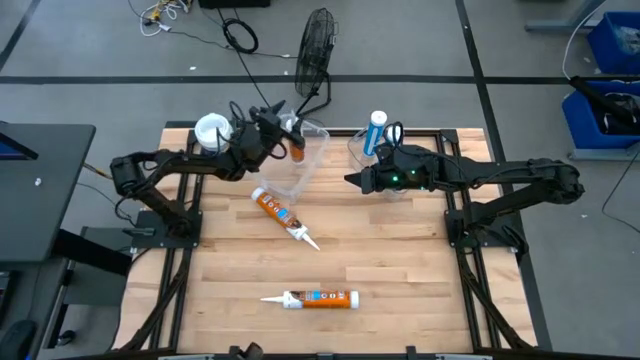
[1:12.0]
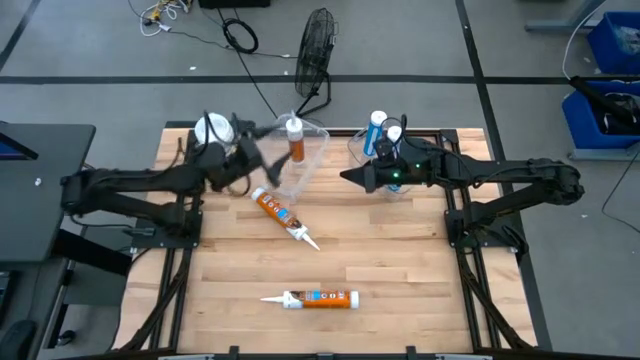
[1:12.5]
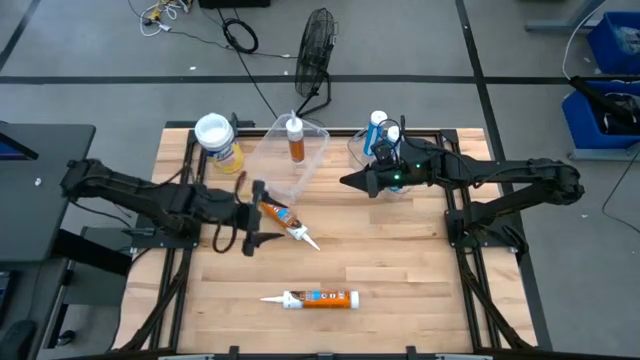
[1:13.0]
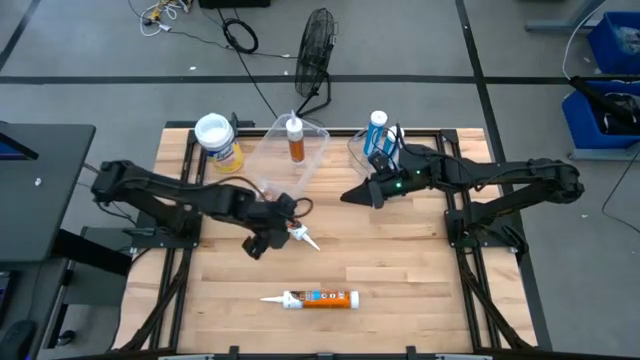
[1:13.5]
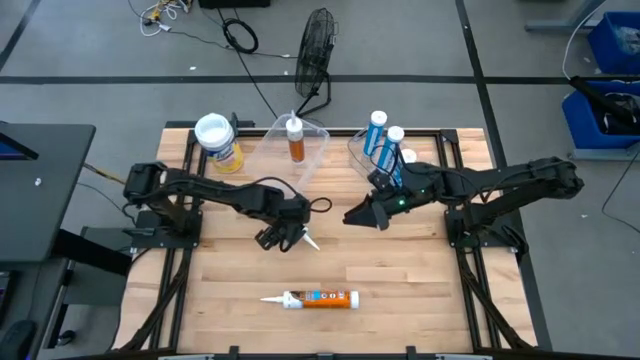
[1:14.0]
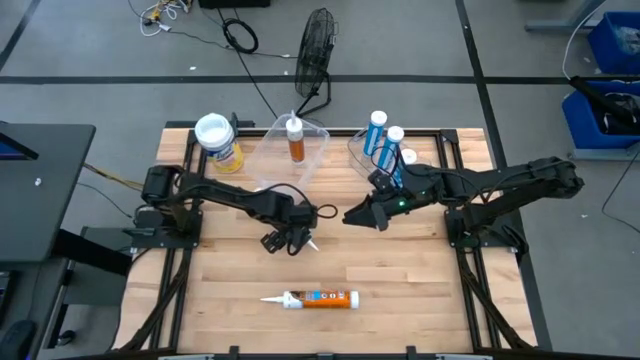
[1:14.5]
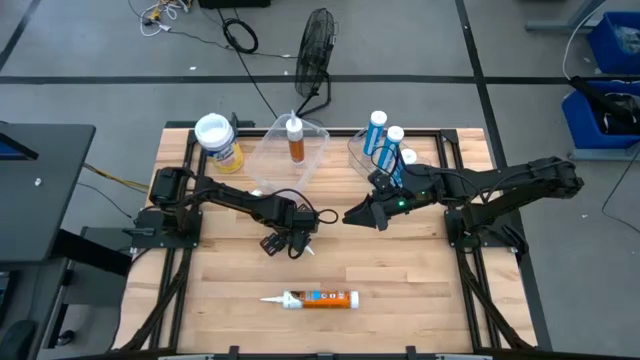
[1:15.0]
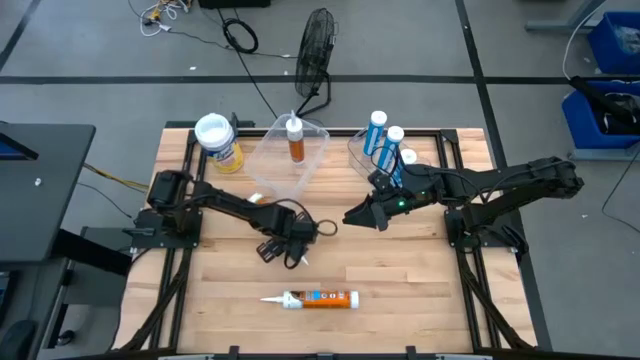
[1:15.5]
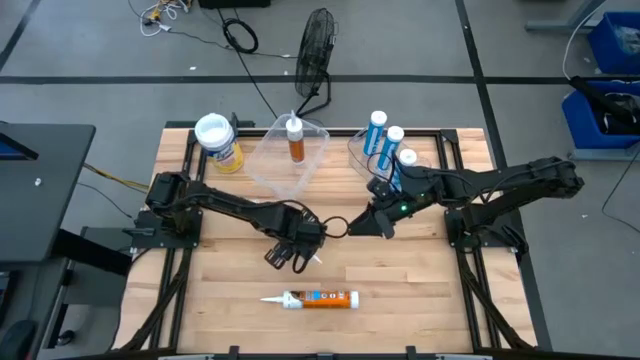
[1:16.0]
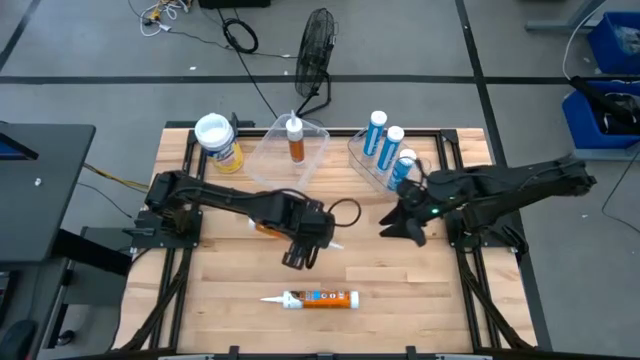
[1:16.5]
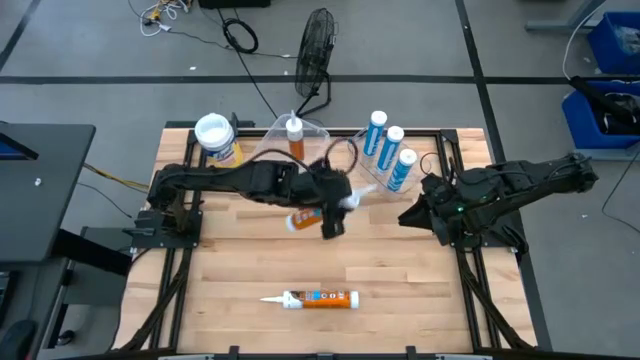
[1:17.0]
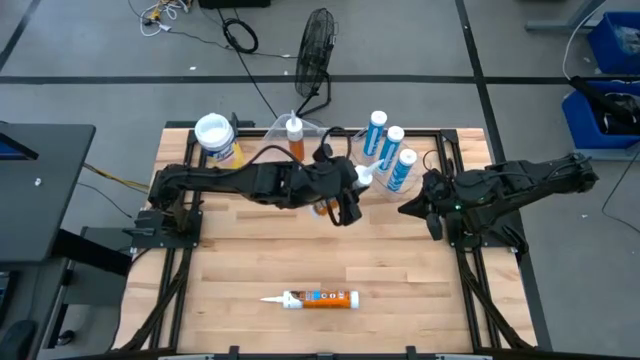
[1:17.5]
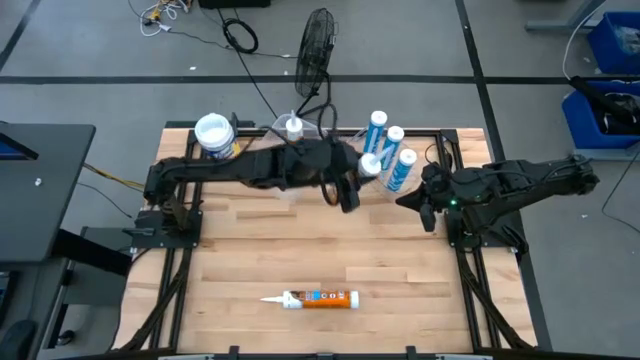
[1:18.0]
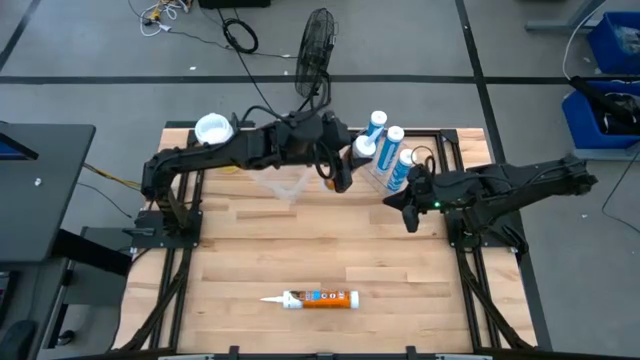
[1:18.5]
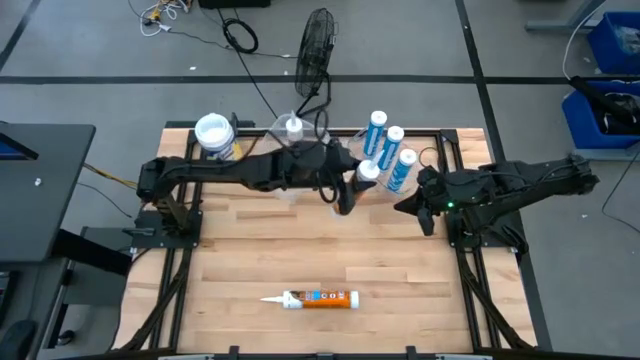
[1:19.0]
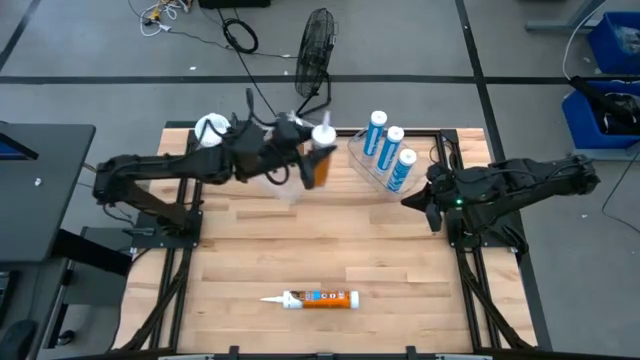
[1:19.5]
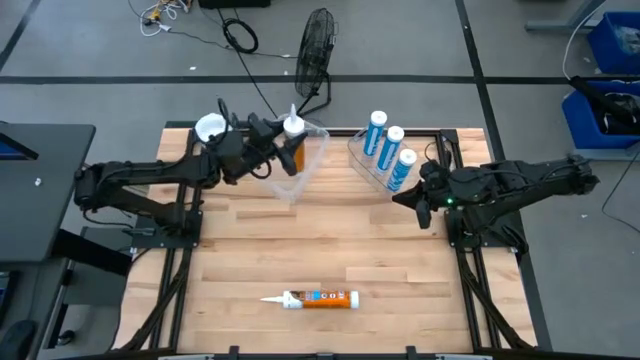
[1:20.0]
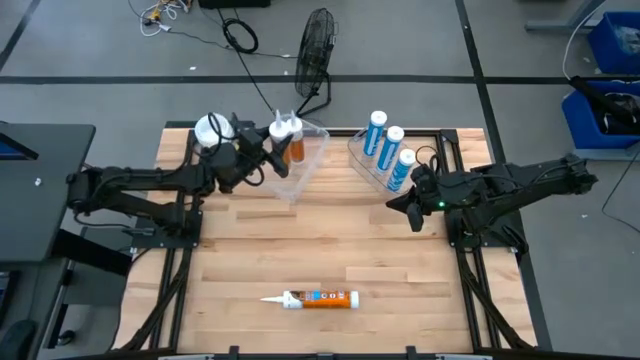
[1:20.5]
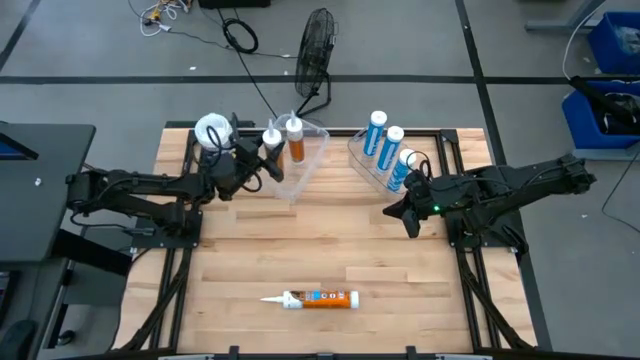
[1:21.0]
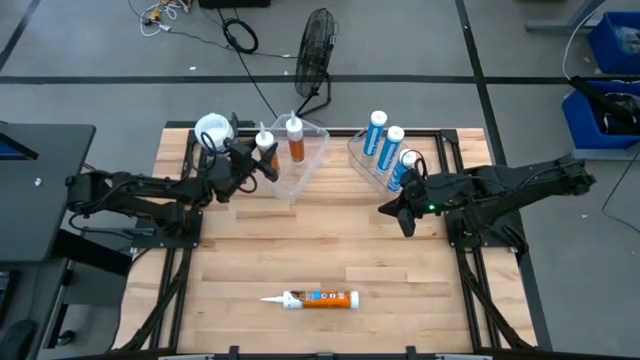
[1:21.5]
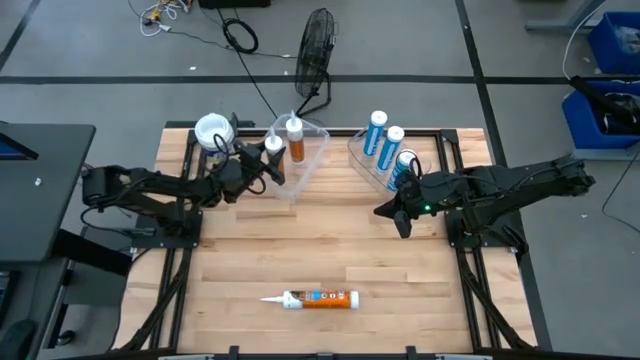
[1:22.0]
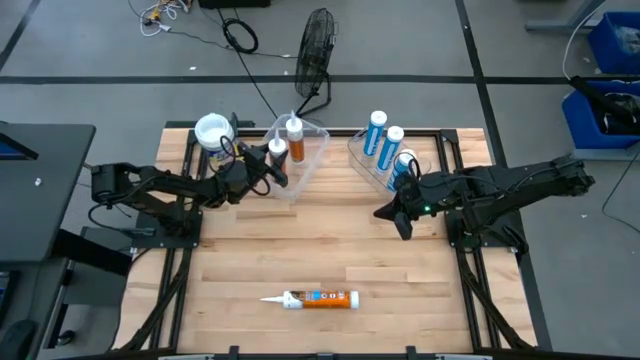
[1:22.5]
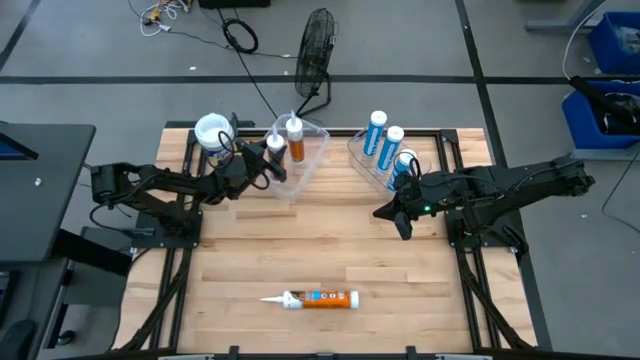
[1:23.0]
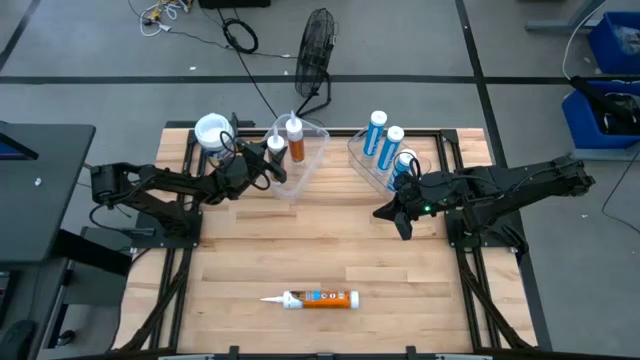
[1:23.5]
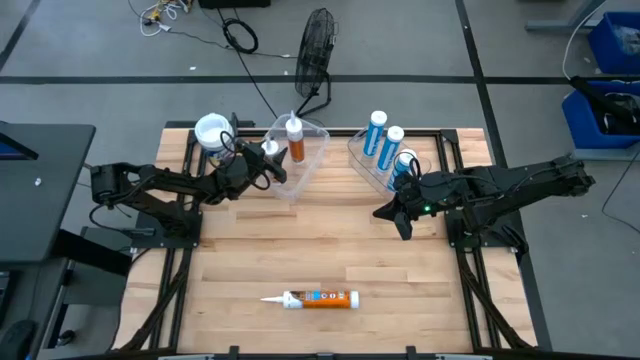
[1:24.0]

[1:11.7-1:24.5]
Task: Pick & place silicon tubes, Sealant and Lysol wipes
Put the top orange sealant into the left transparent bin

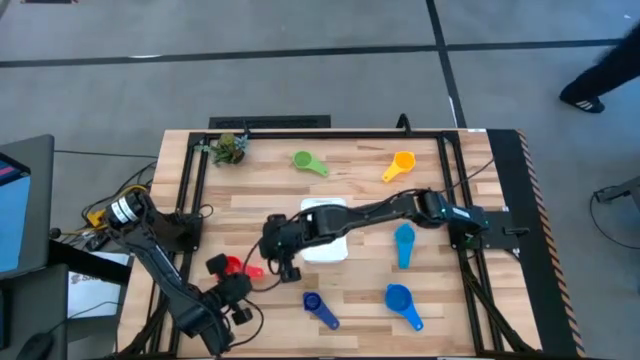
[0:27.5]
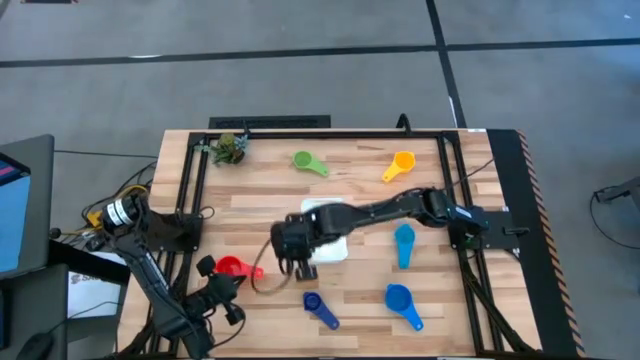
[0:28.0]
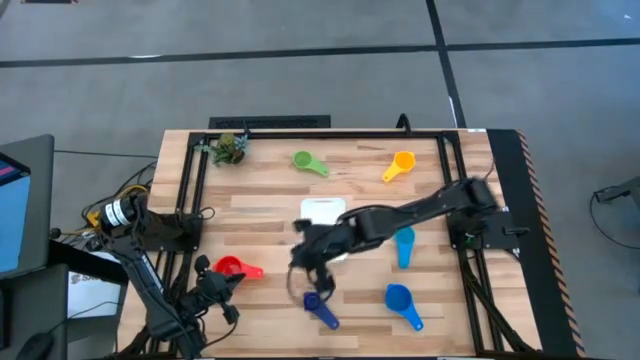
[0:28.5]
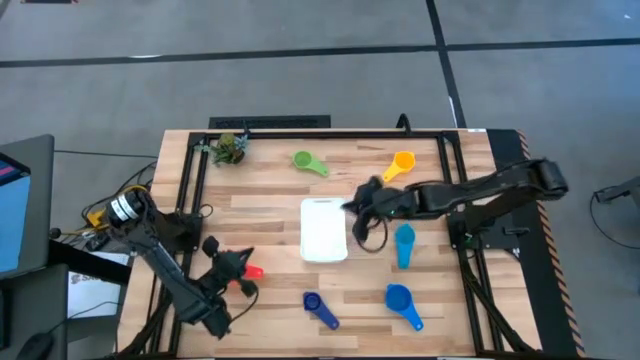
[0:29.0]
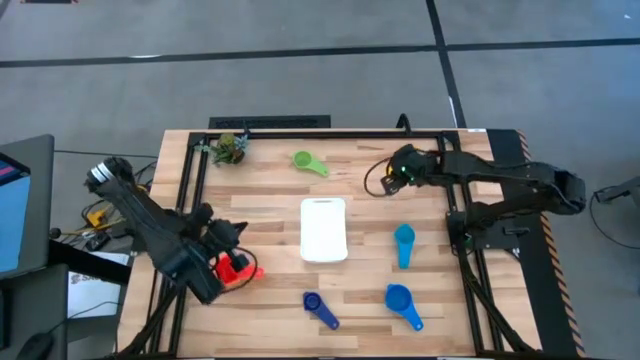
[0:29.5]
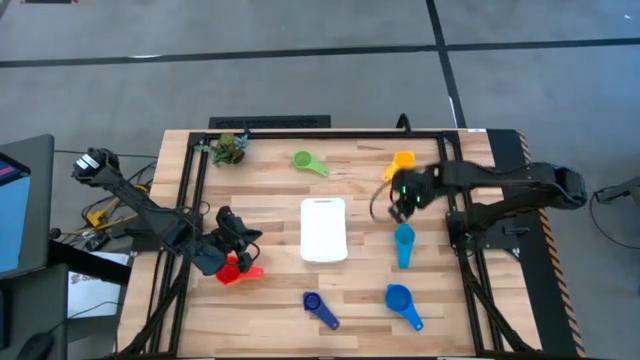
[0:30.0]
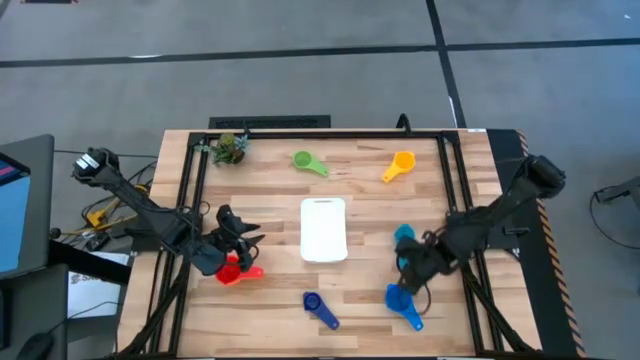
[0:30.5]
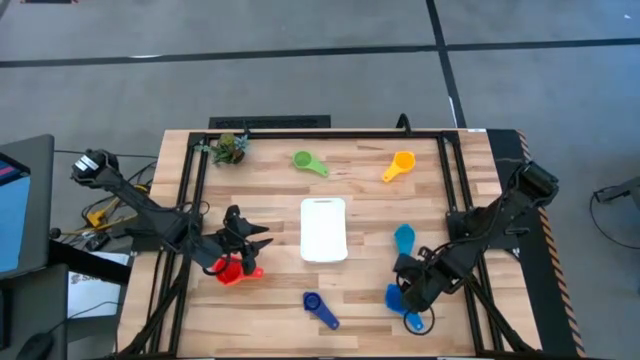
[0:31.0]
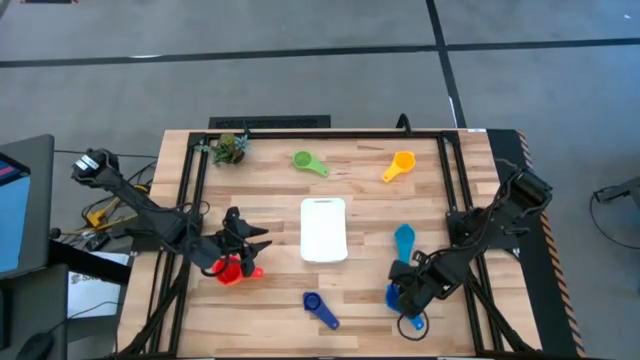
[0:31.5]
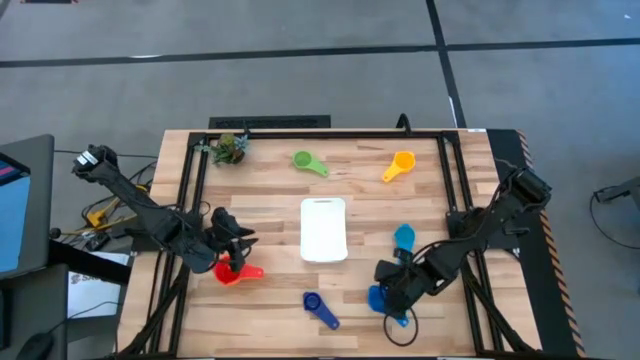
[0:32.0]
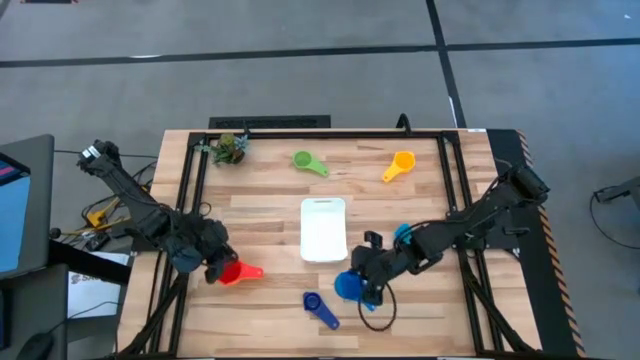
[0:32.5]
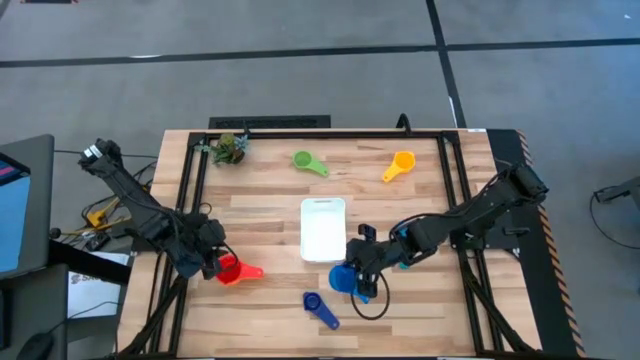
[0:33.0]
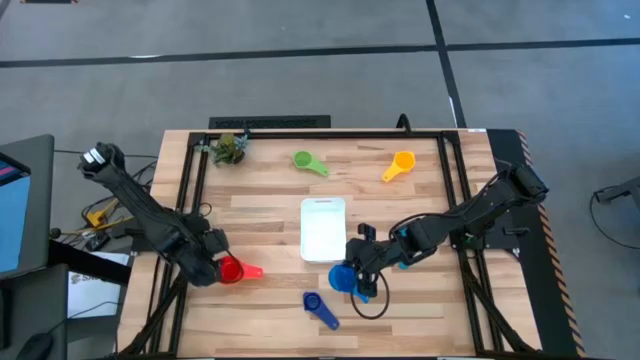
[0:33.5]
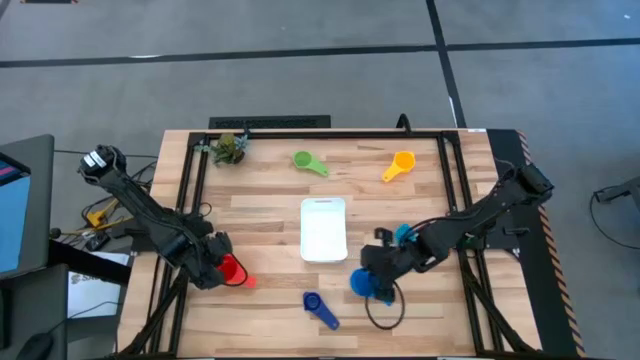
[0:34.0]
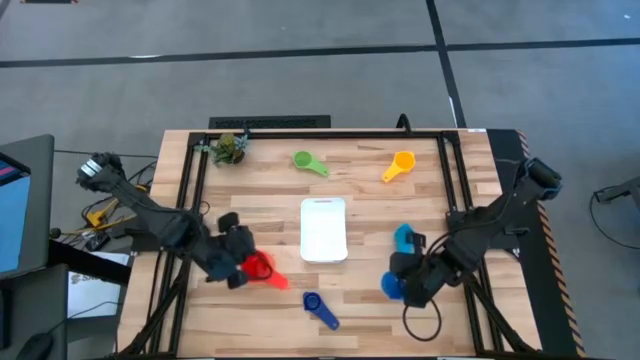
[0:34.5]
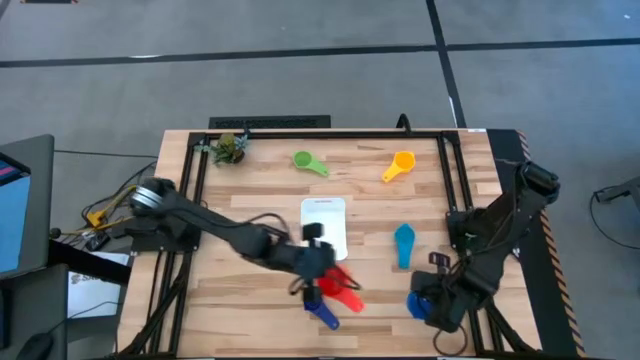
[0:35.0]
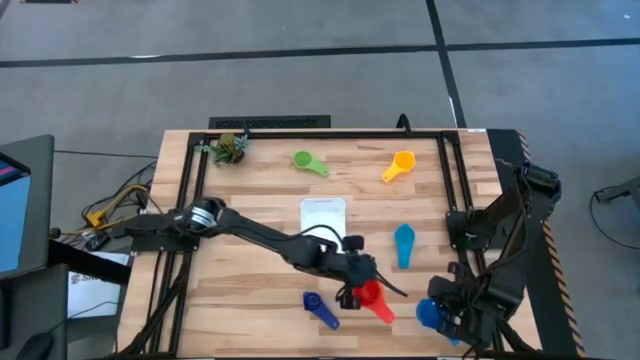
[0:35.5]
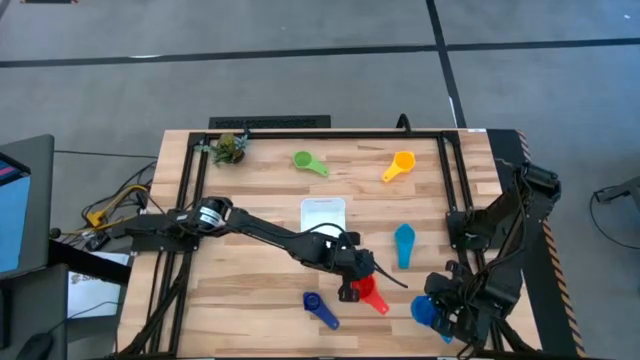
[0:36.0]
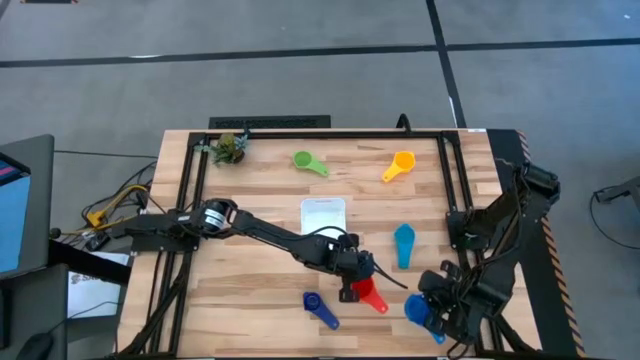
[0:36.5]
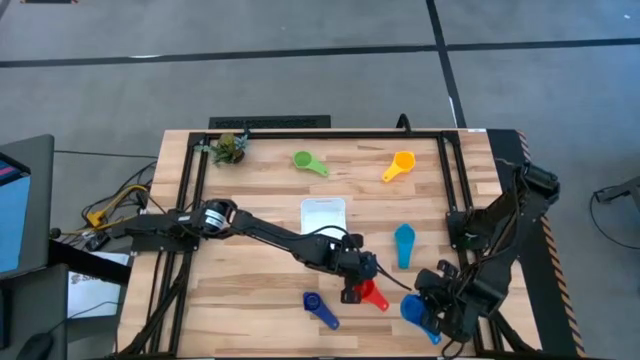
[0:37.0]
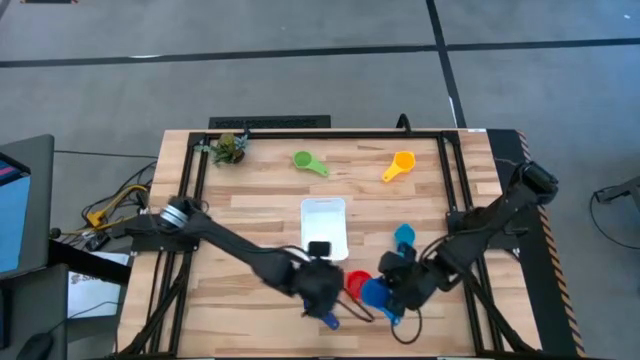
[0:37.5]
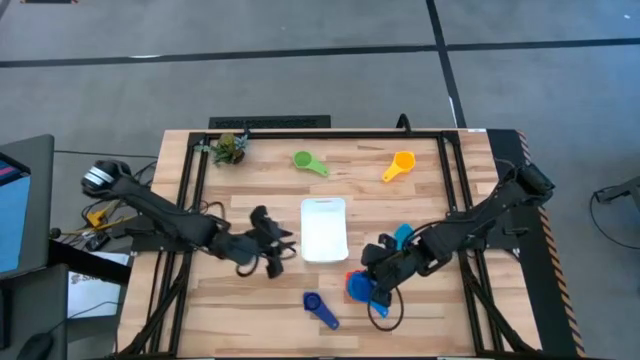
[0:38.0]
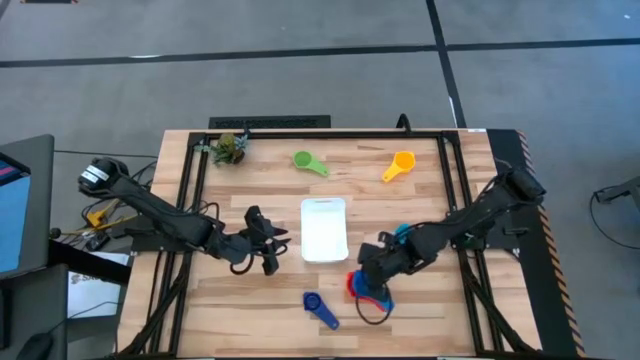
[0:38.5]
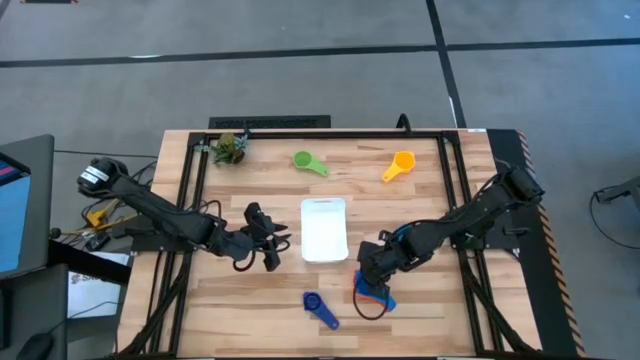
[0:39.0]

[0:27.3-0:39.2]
Task: Nest measuring cups in basket
Stack the blue measuring cup on top of the red measuring cup
